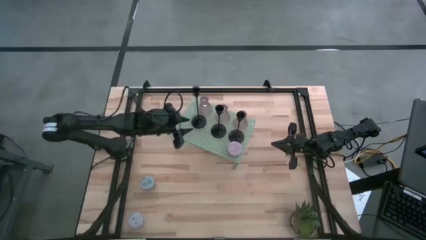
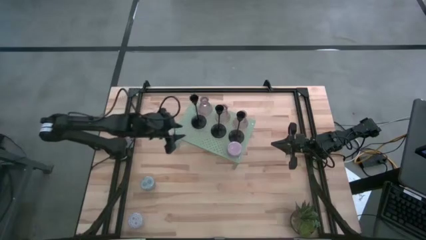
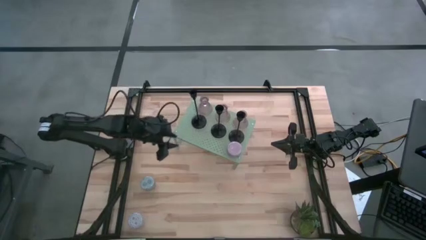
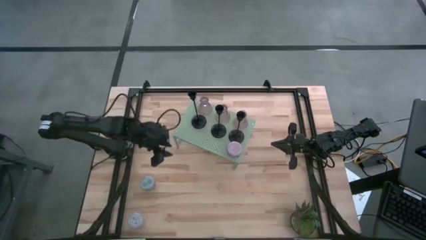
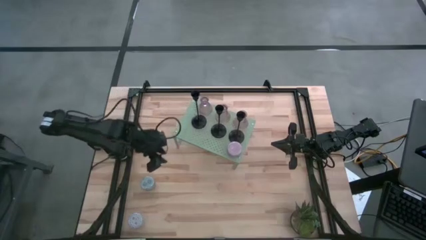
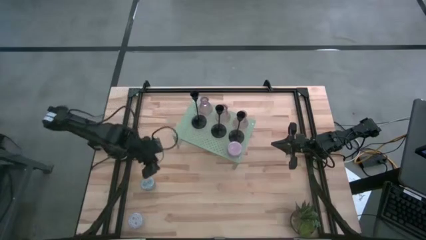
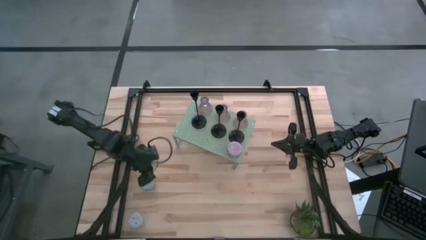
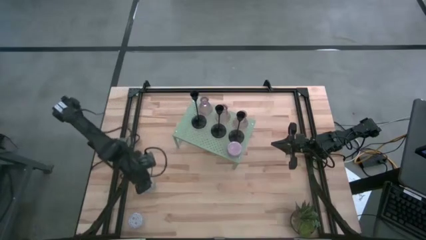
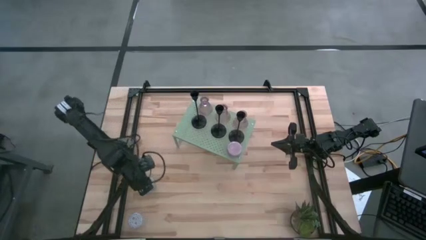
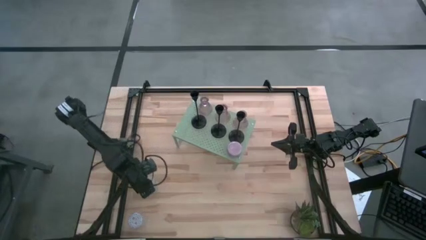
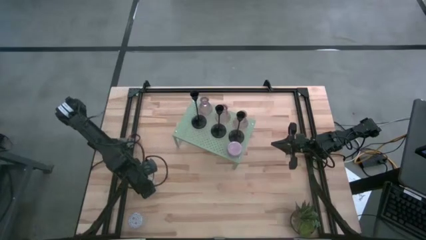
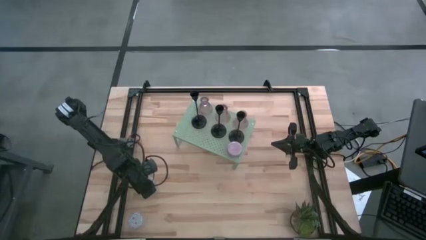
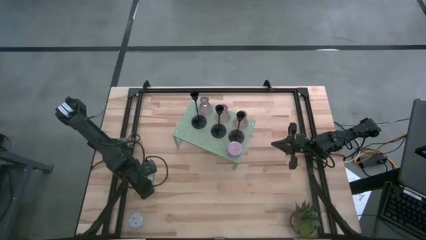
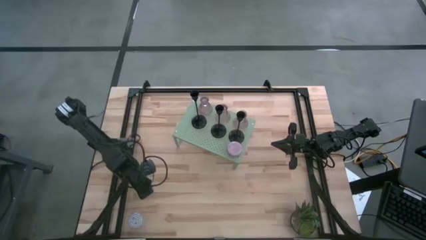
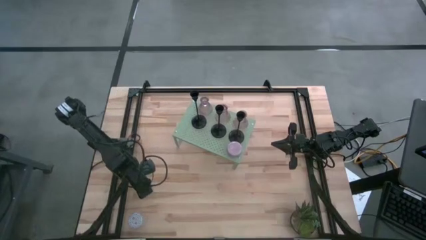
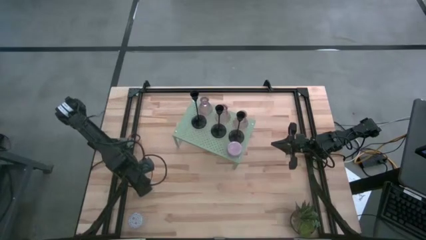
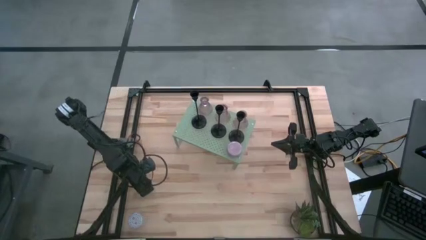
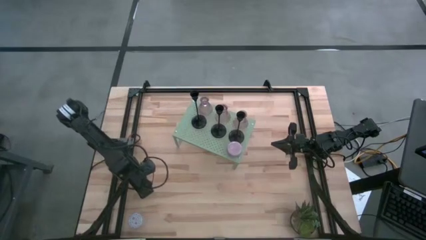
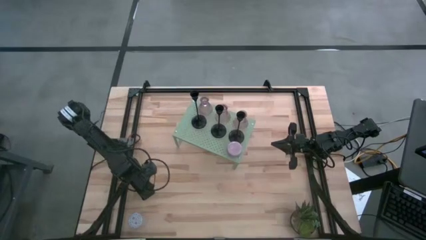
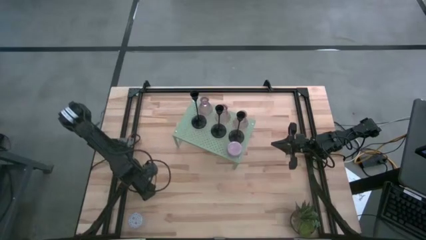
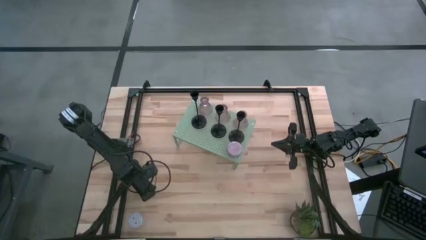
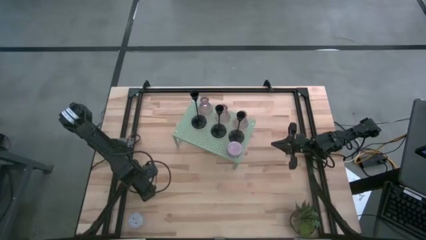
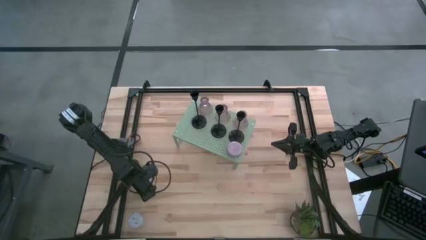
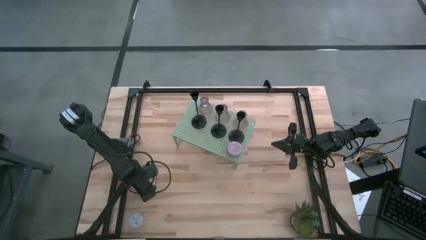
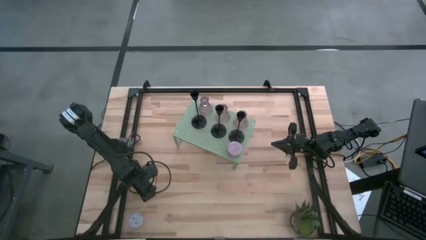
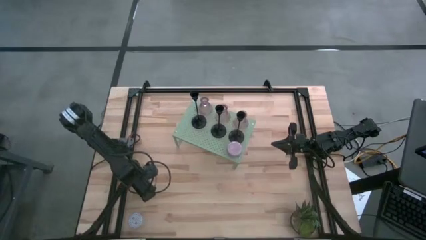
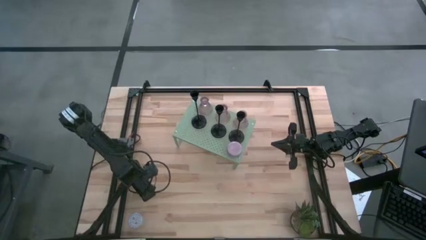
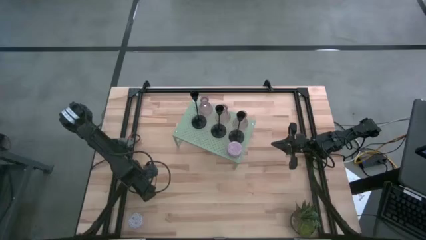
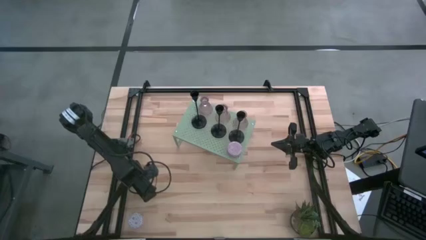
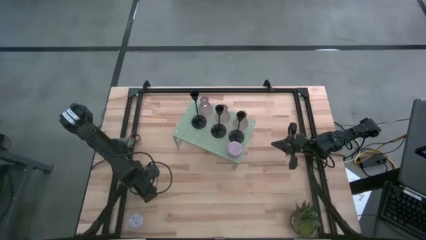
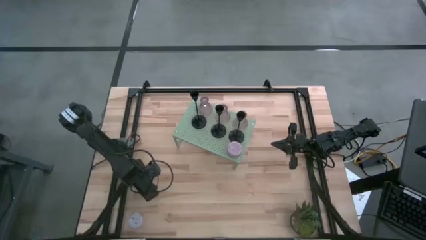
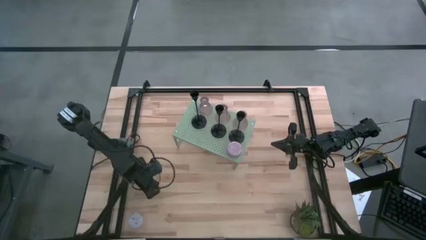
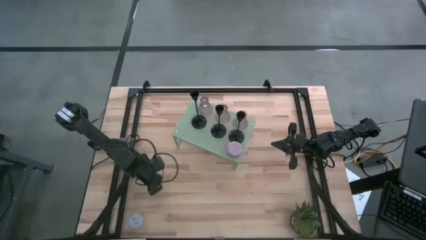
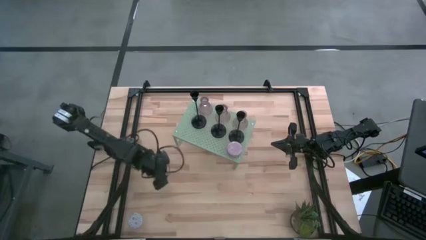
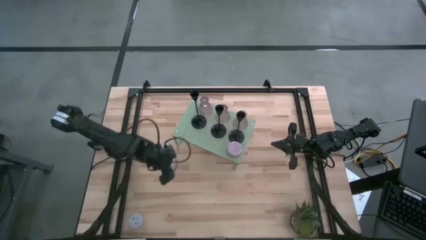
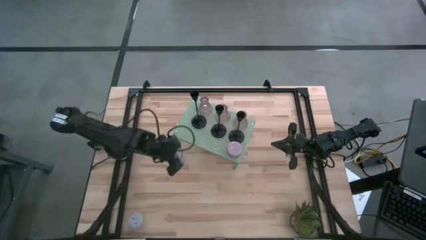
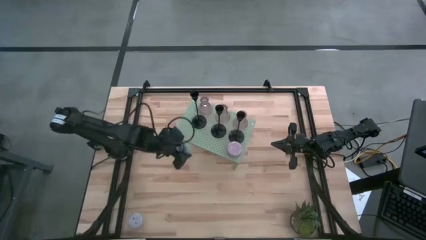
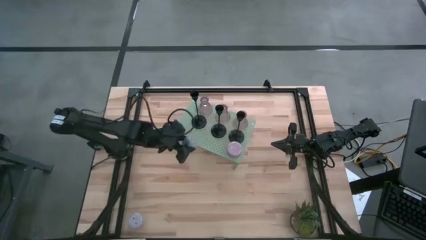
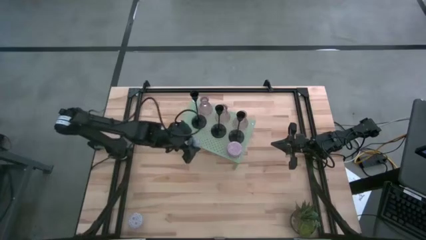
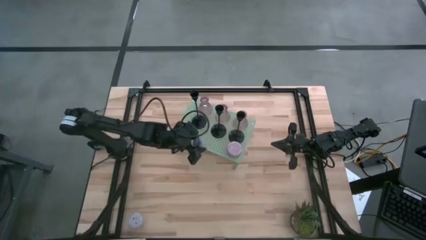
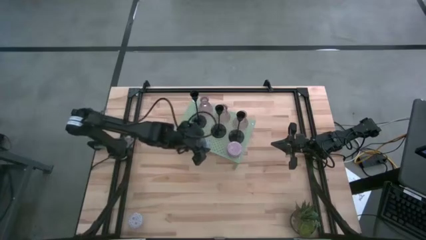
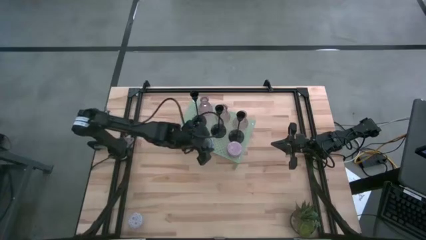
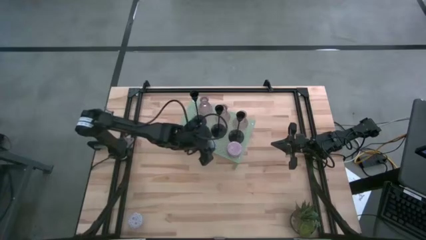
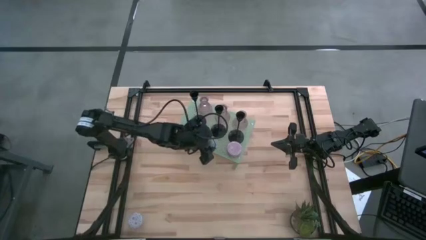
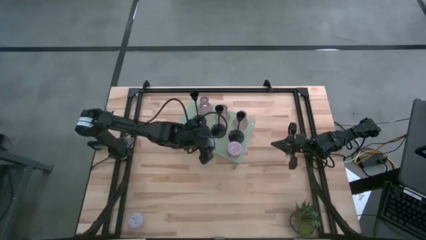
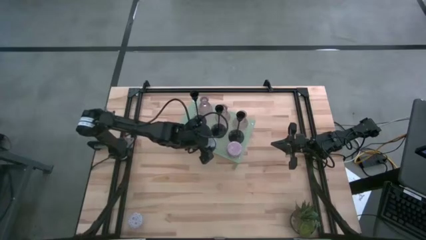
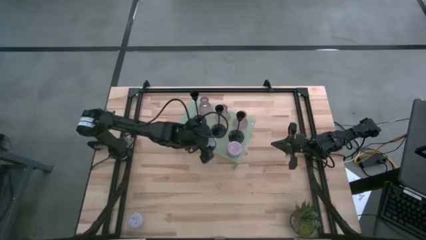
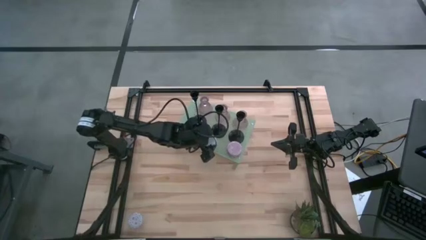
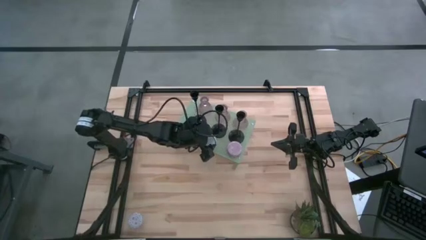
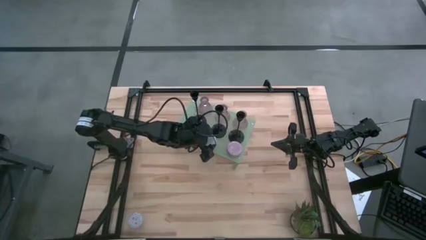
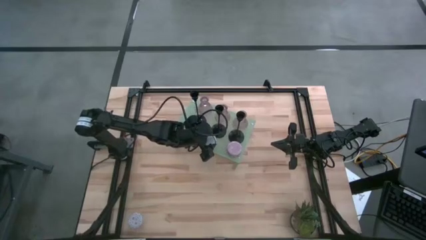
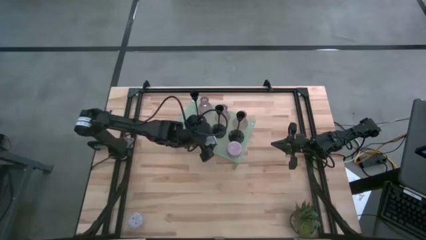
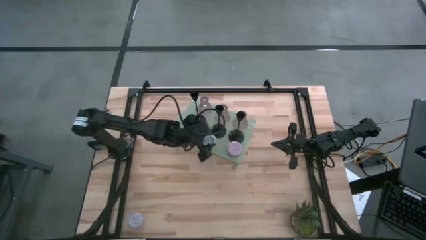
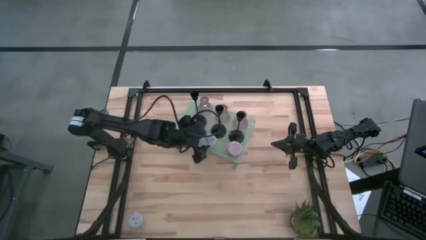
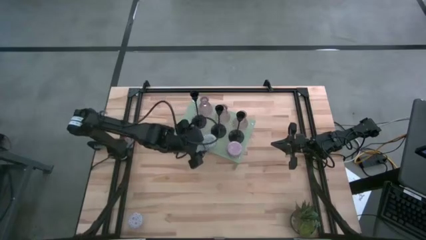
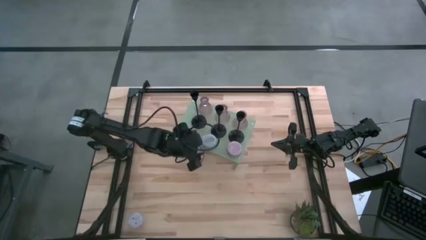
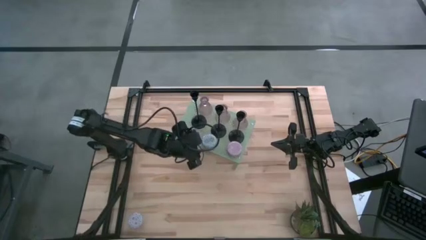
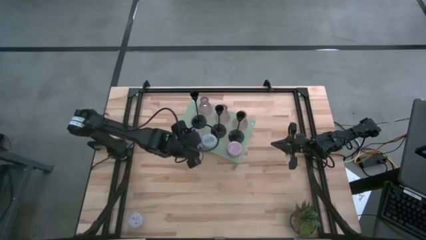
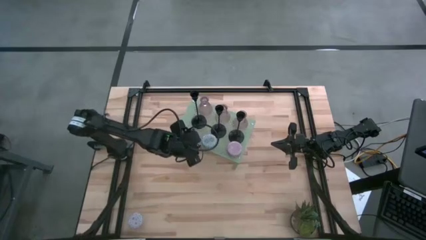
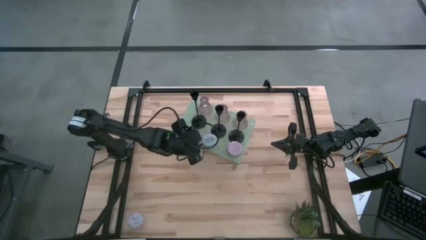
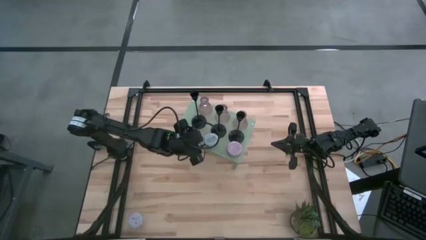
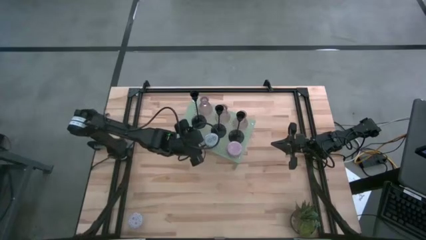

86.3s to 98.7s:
Task: Pick & Place candle stick holders
Put the blue patterned scented candle on the shelf aligned with the purple patterned scented candle

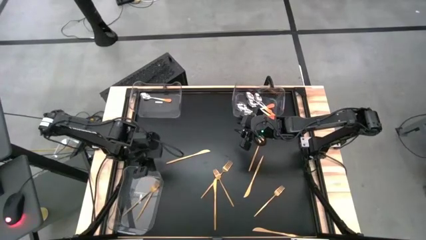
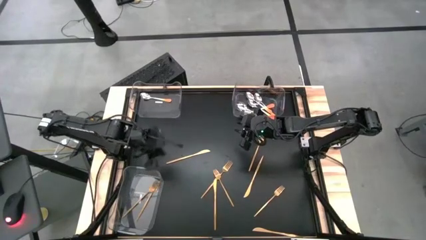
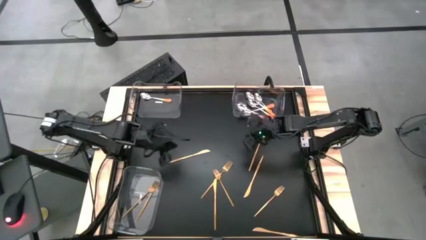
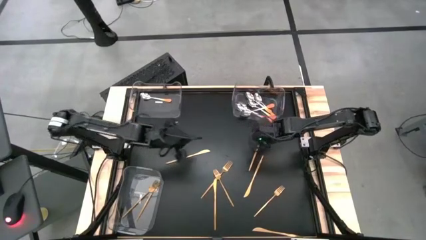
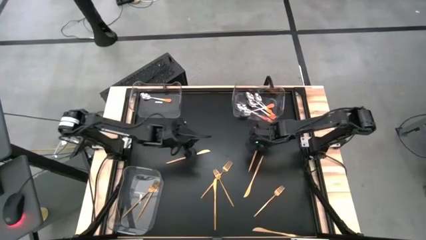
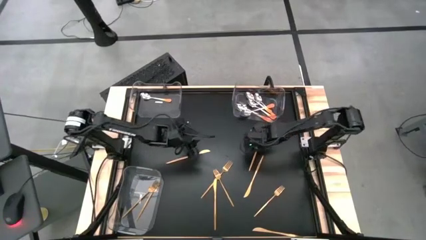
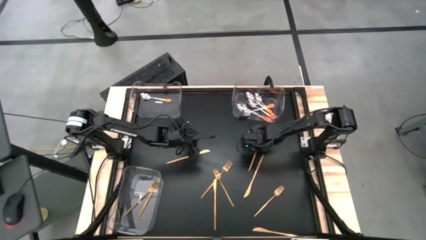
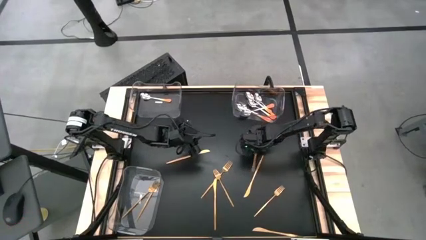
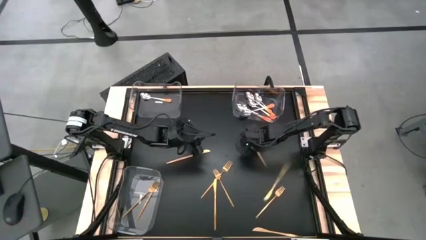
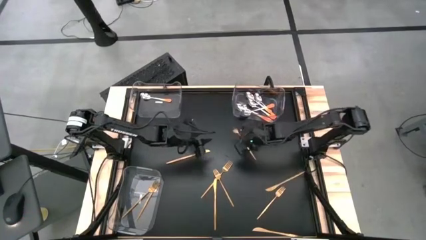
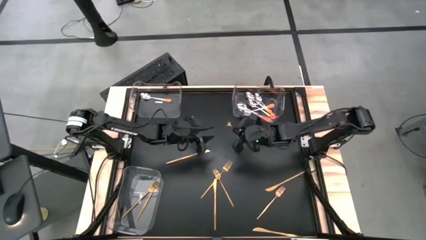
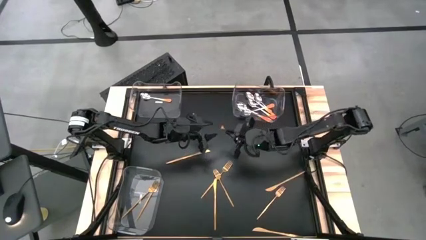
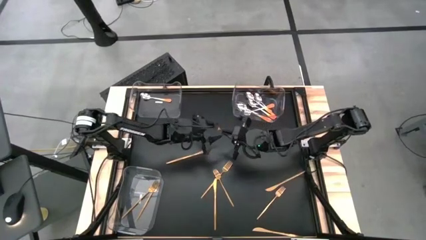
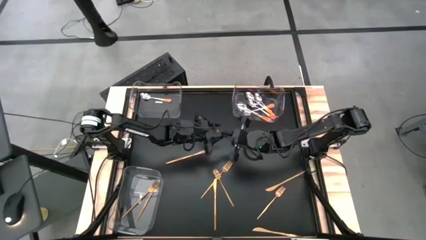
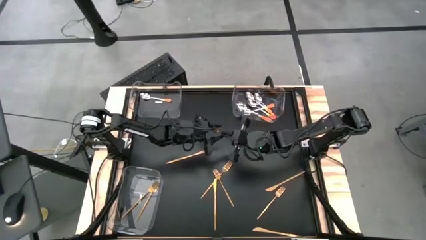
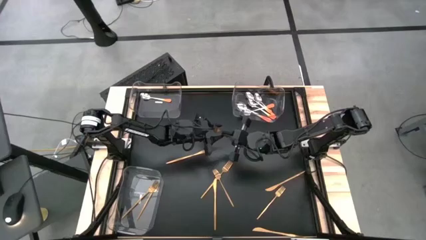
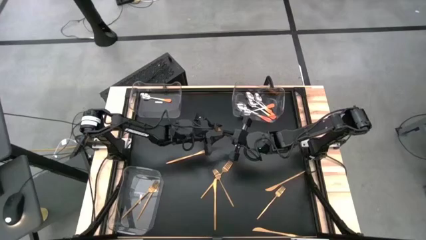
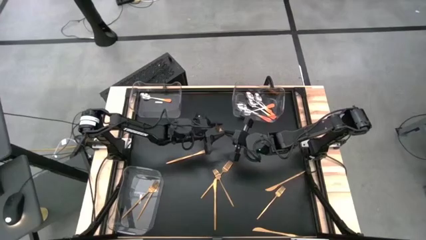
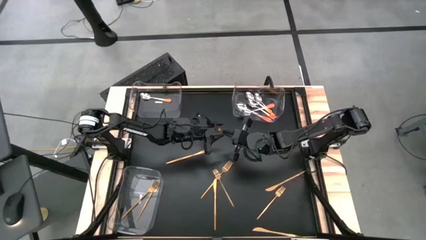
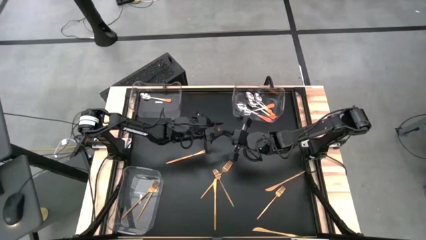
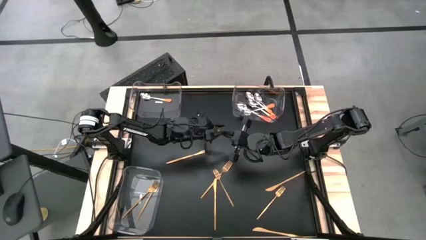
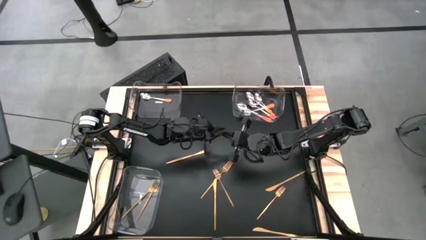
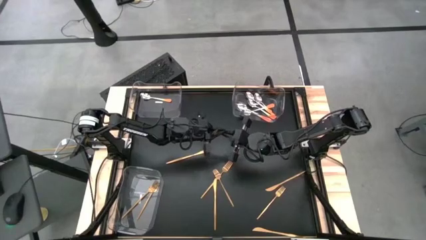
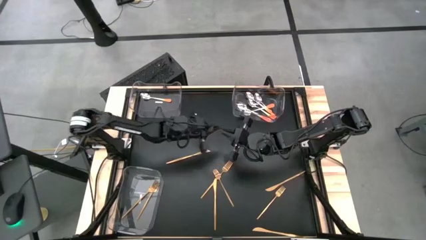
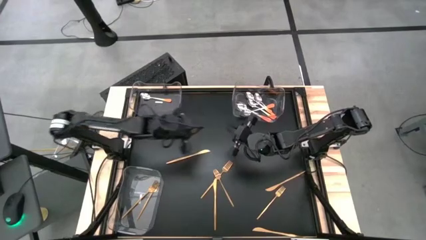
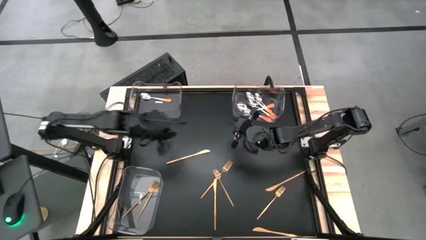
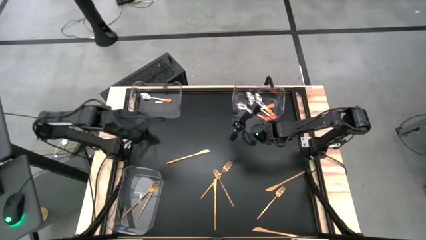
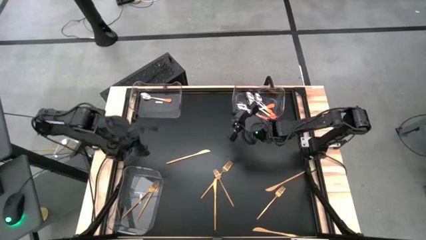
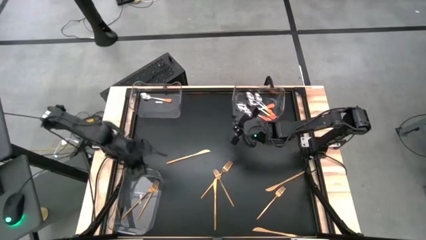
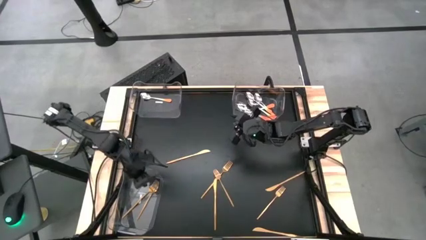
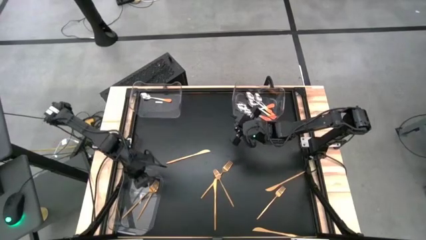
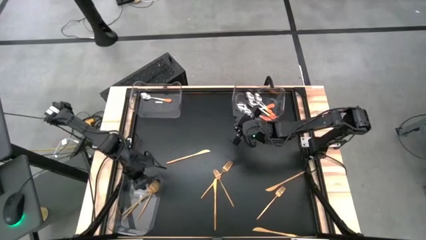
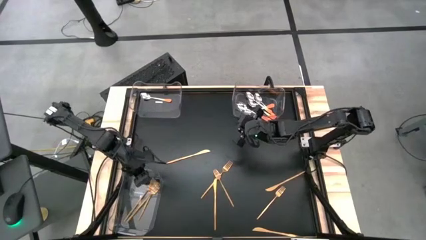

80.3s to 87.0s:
Task: Sort silverware by color (type)
Put the gold fork into the bottom left transparent bin
